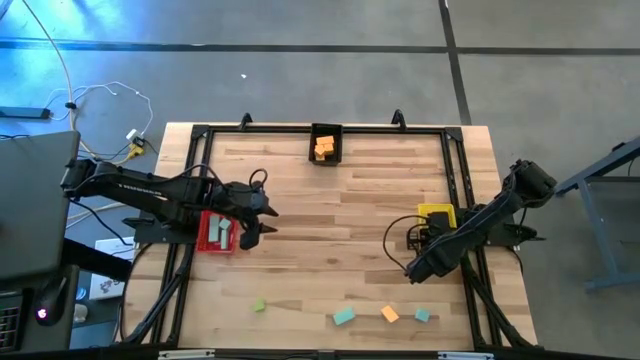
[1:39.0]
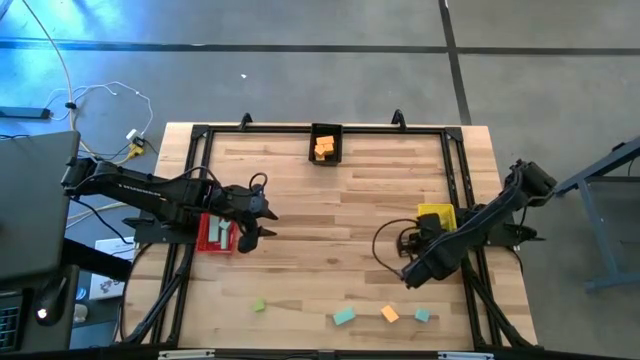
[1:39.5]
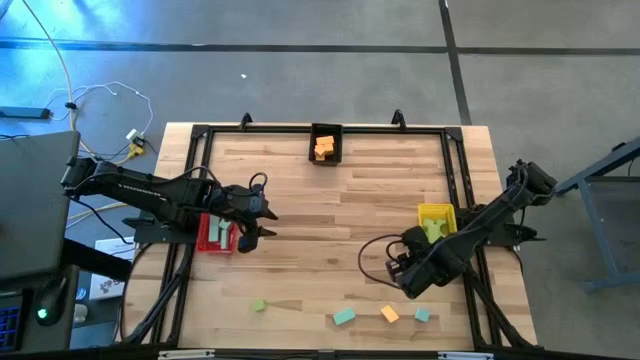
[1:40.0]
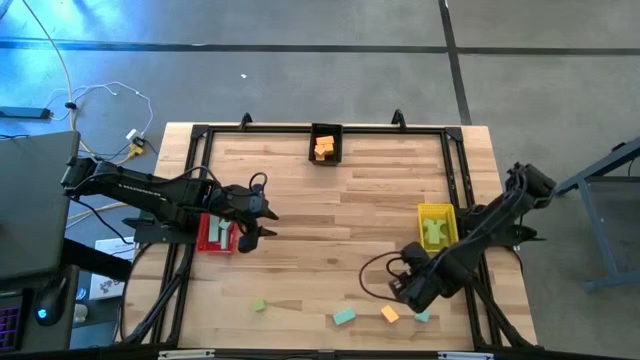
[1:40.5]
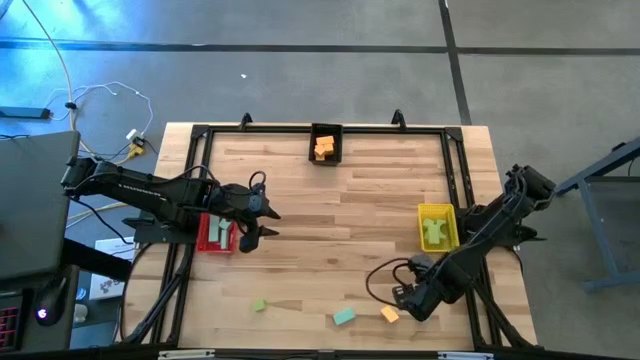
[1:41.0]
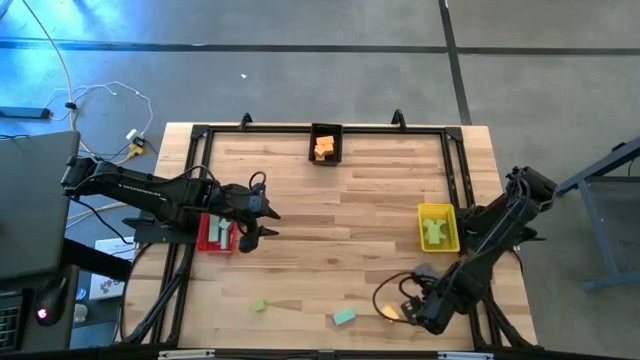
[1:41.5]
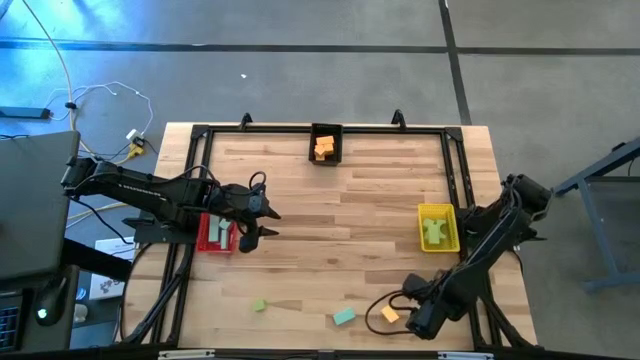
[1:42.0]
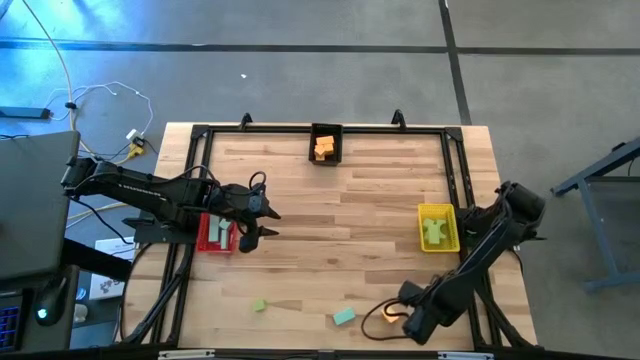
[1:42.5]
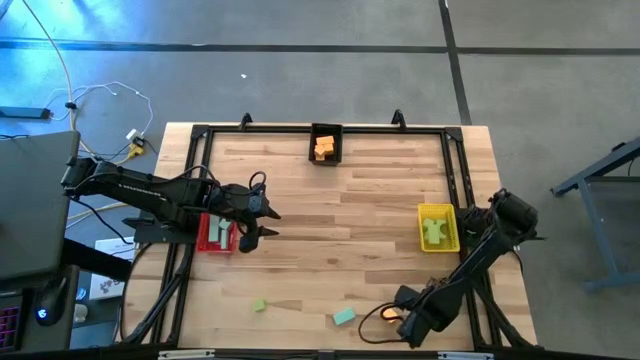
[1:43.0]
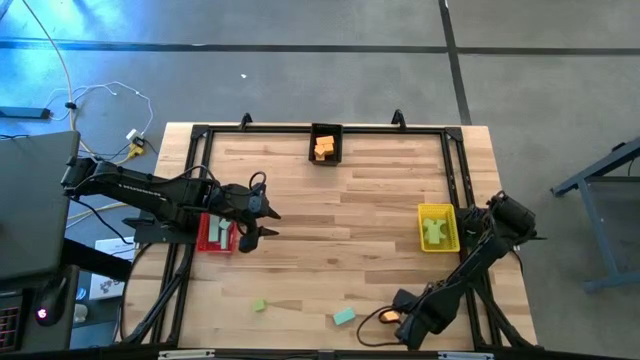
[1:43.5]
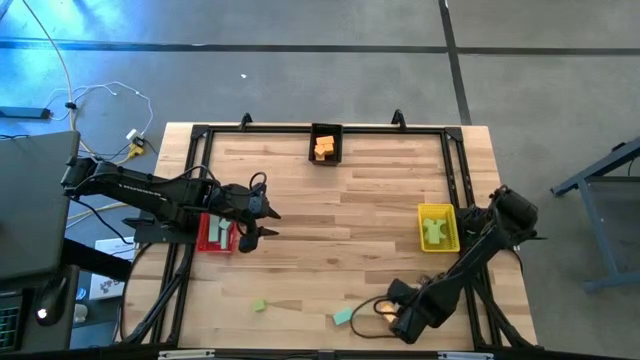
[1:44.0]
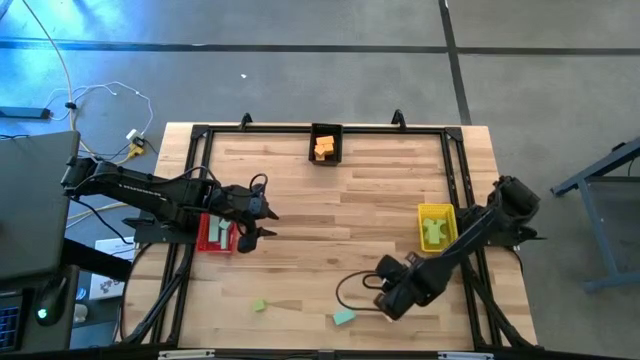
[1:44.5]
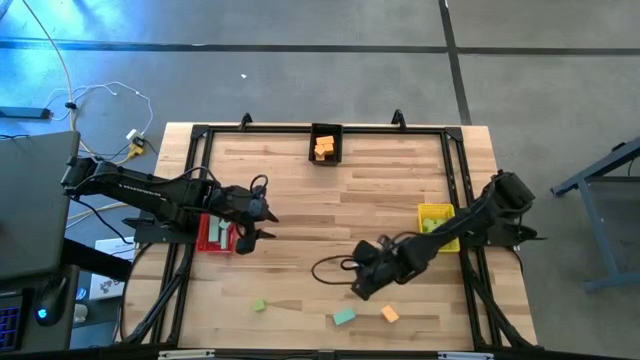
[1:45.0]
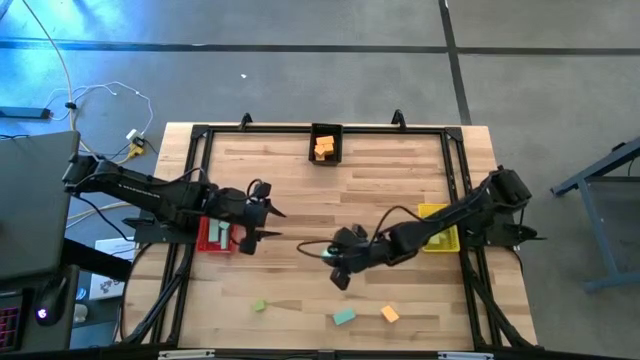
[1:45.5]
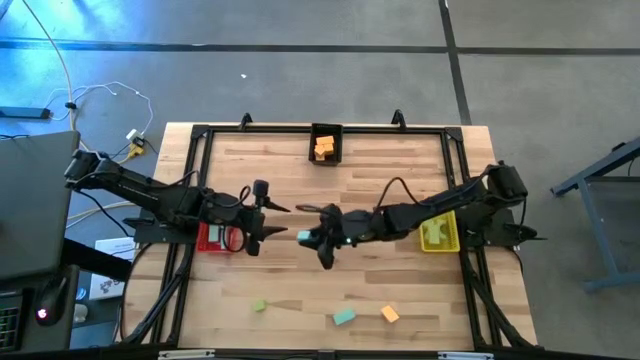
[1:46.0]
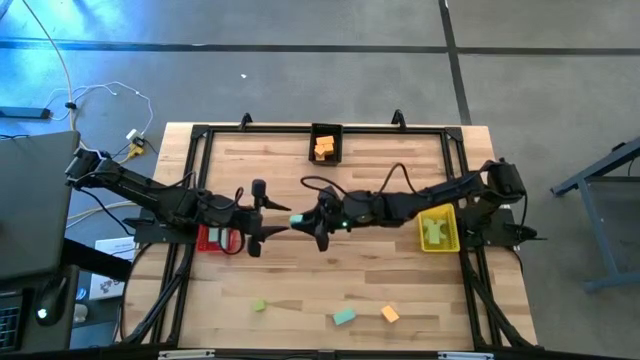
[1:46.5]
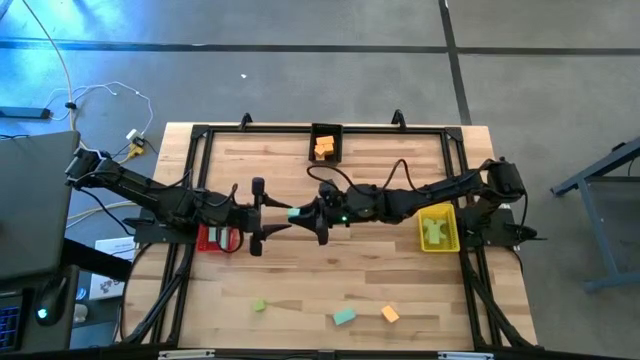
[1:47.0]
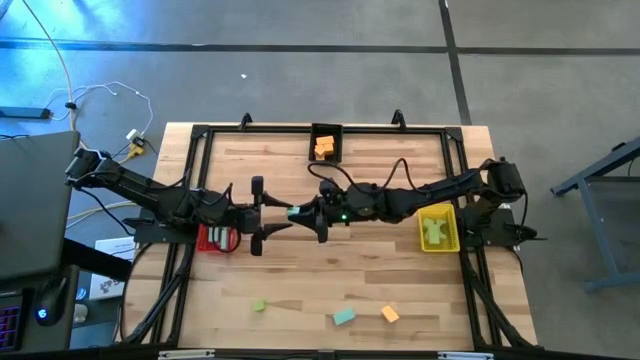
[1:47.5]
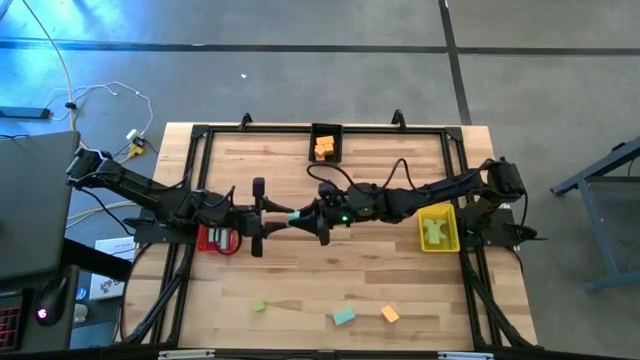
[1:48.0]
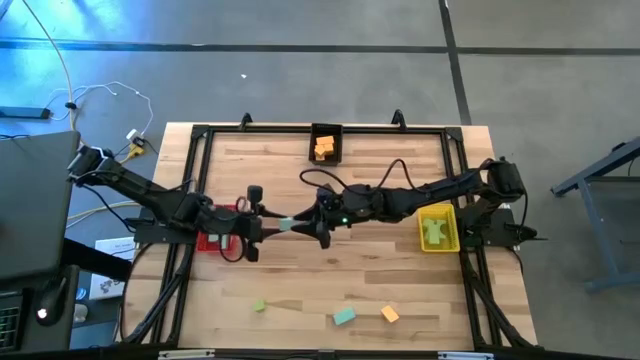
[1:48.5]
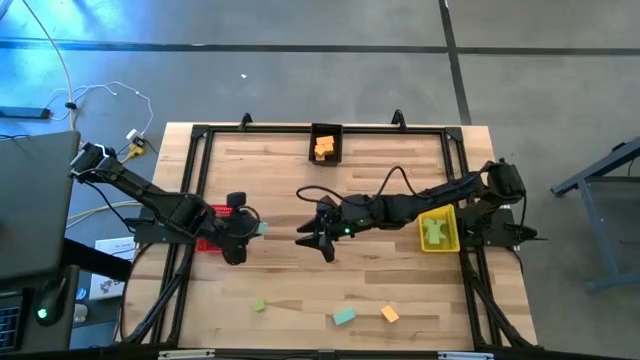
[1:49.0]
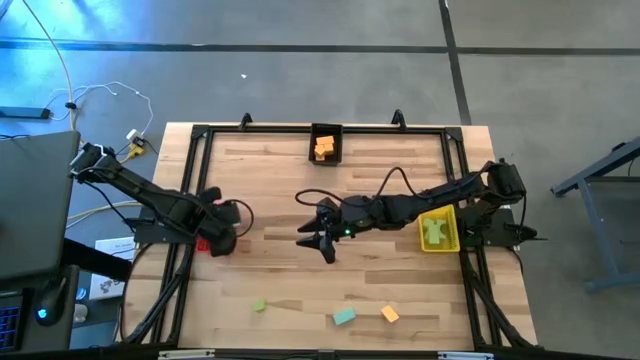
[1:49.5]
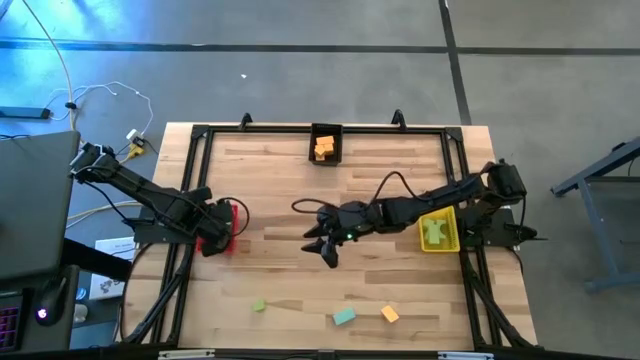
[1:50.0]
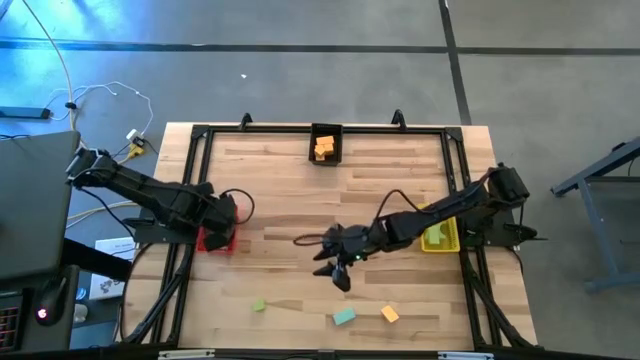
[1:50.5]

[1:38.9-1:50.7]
Task: Sort & place blocks by color
Put the blue block into the red bin

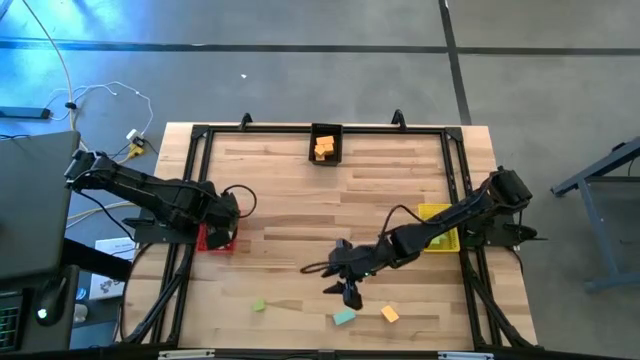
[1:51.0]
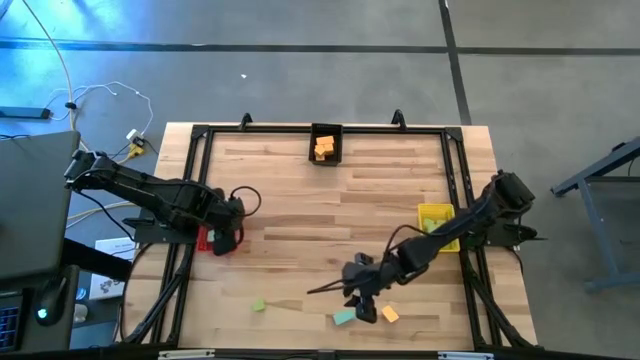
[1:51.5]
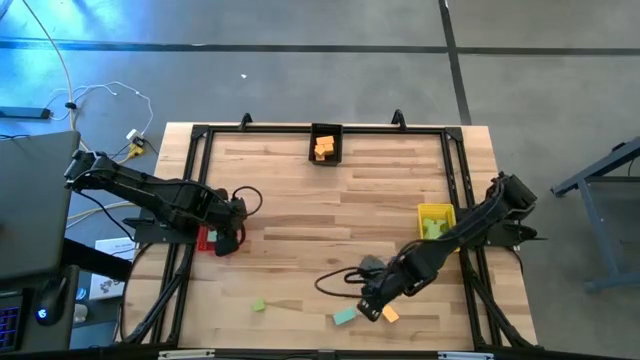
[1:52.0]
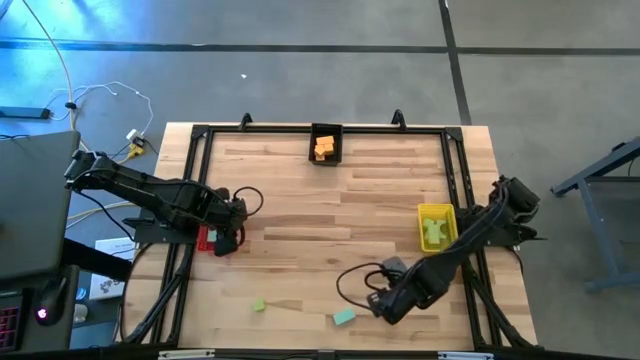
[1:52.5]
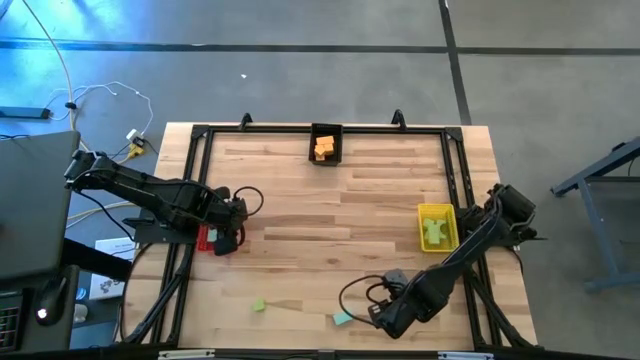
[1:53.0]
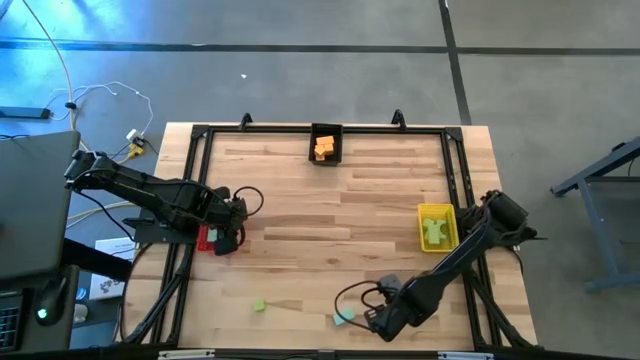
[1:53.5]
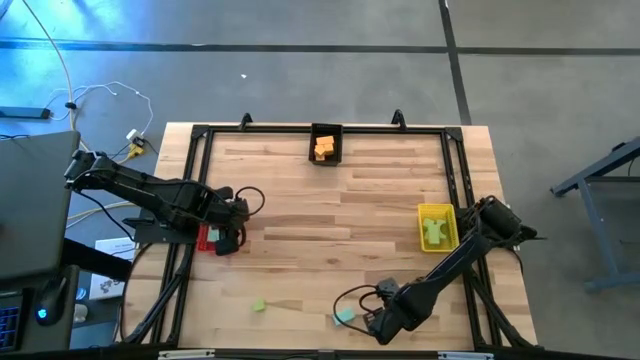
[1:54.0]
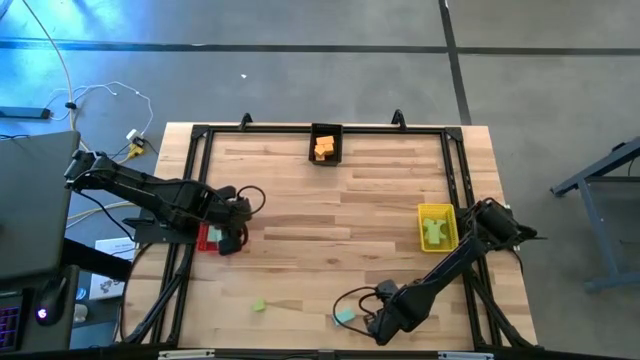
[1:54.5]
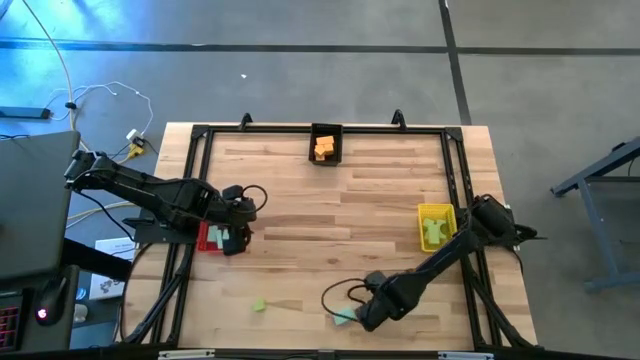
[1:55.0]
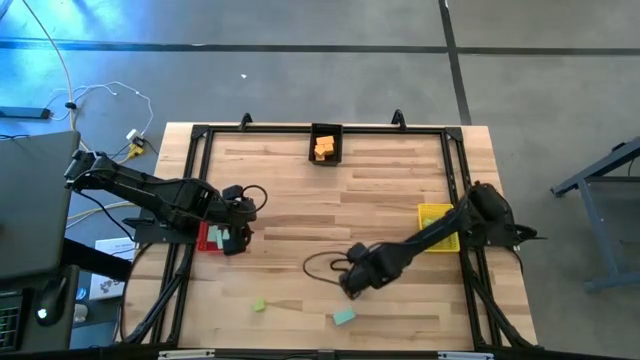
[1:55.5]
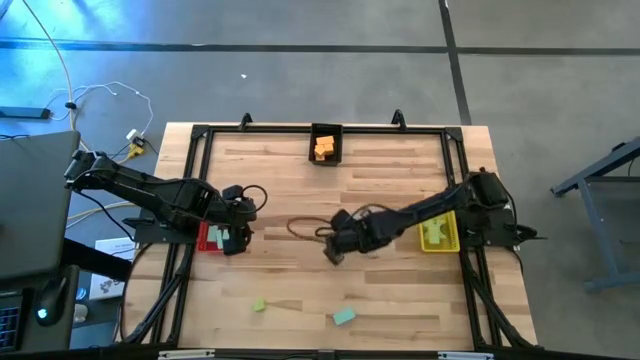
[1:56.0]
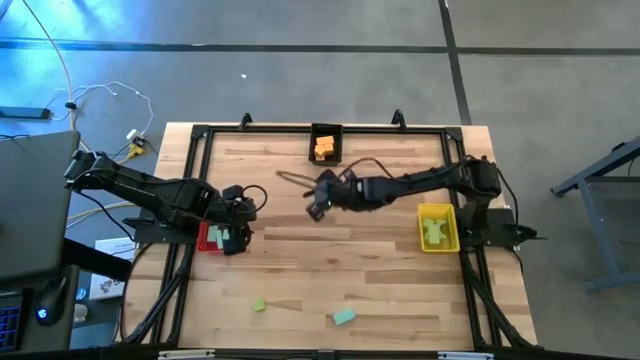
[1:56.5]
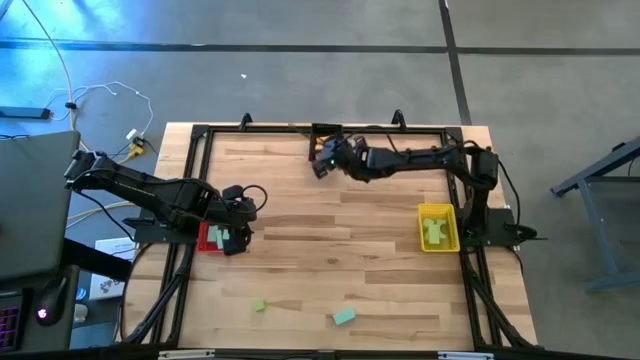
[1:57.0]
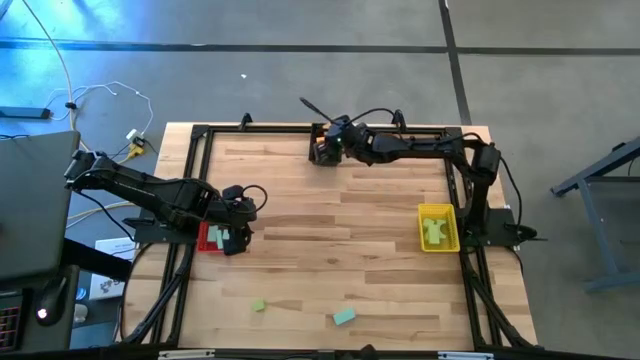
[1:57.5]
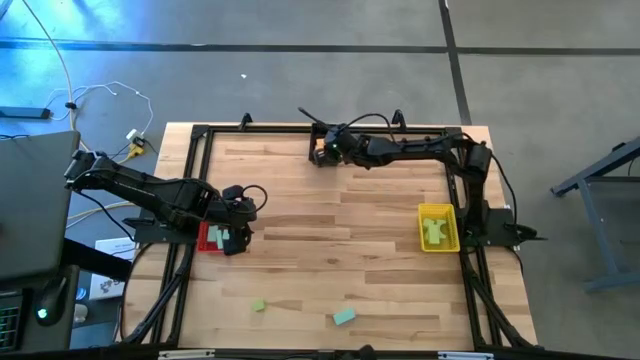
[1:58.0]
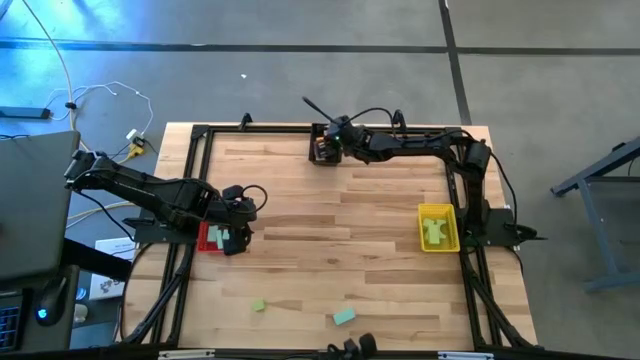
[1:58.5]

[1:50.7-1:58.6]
Put the orange block into the black bin

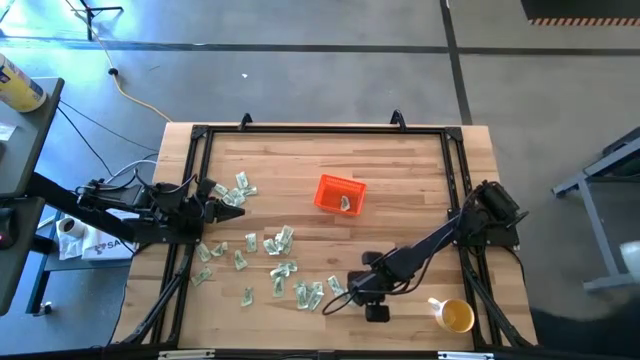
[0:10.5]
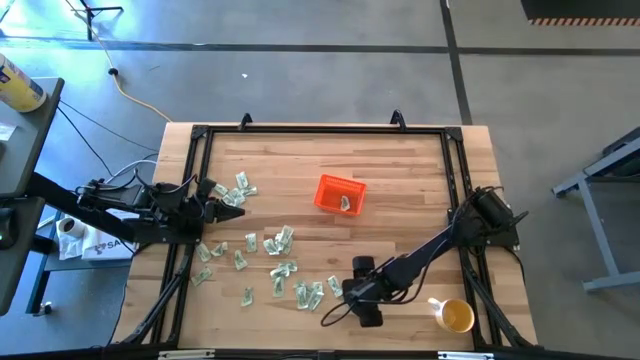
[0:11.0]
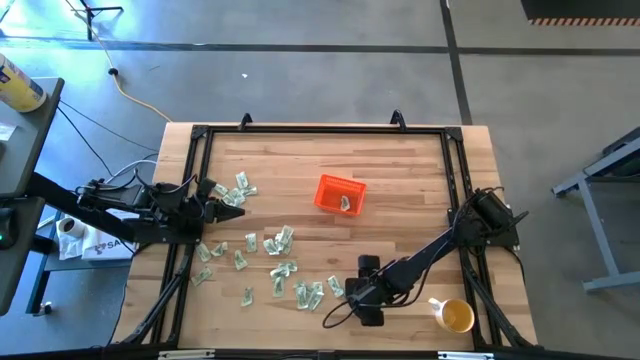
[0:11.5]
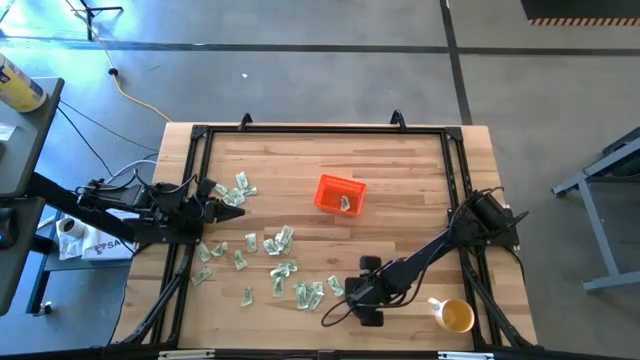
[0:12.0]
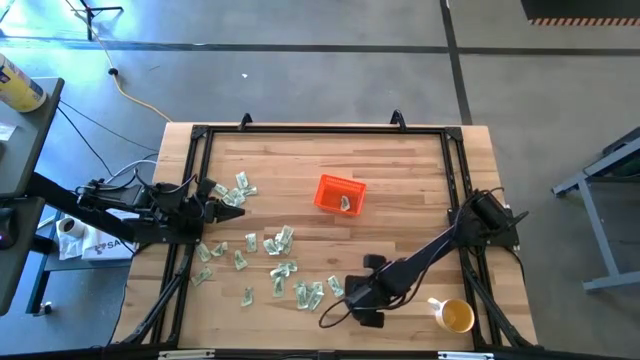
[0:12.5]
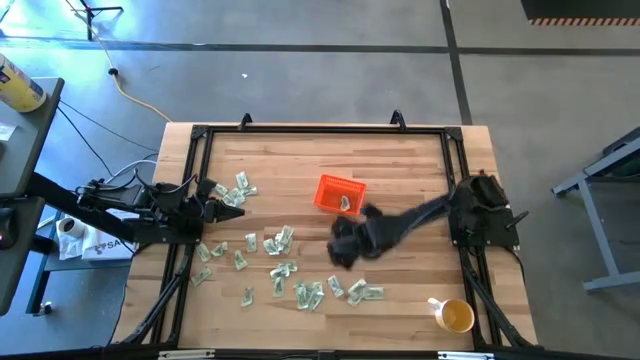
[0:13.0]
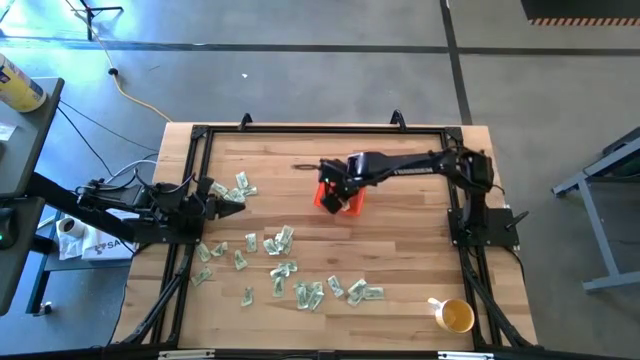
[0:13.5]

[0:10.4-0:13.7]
Task: Pick and place Stevia / Truvia into bins
Put the green stevia packet into the orange basket
